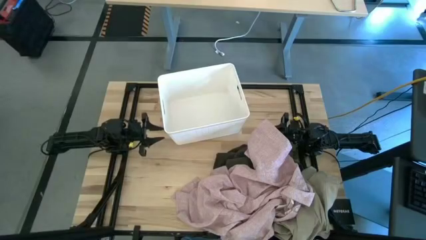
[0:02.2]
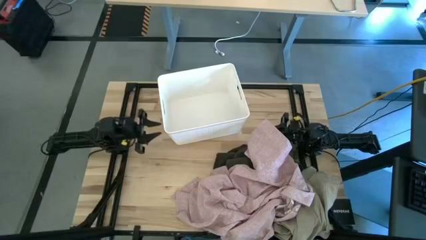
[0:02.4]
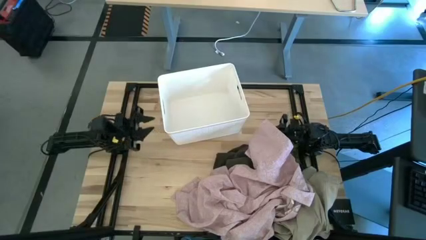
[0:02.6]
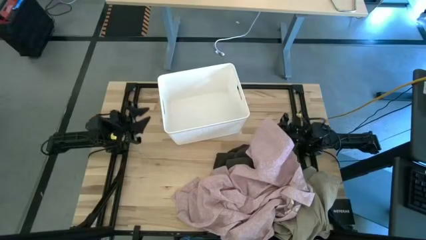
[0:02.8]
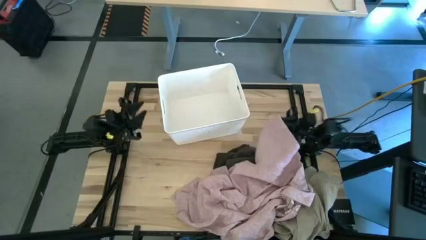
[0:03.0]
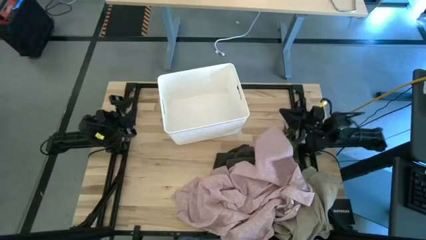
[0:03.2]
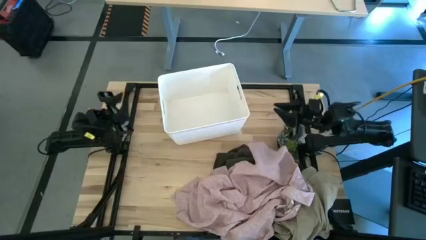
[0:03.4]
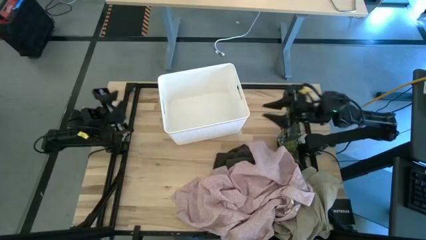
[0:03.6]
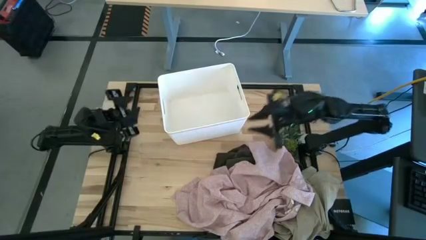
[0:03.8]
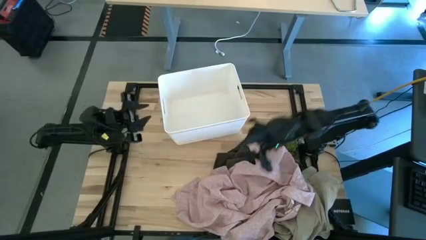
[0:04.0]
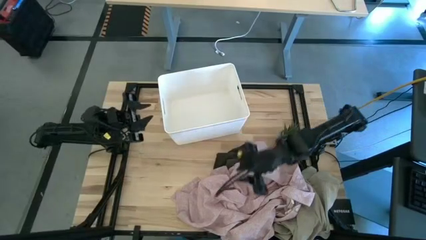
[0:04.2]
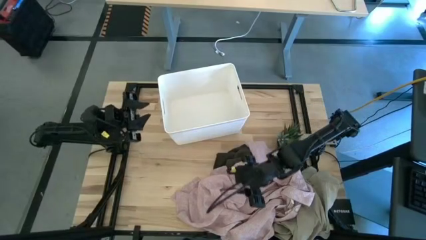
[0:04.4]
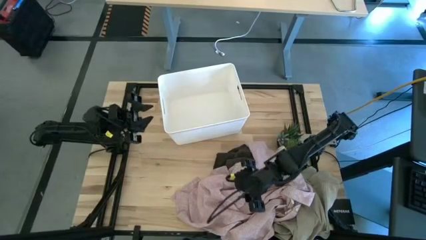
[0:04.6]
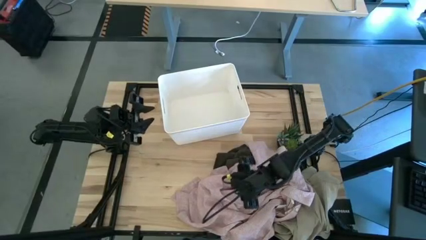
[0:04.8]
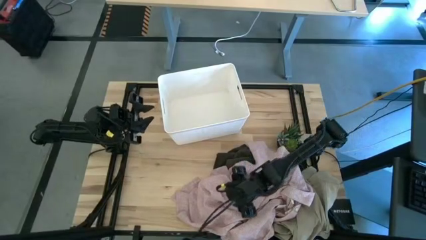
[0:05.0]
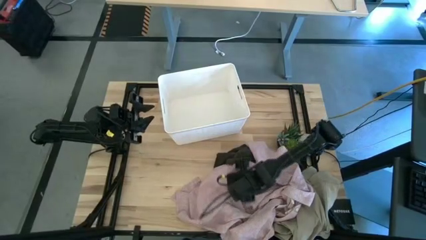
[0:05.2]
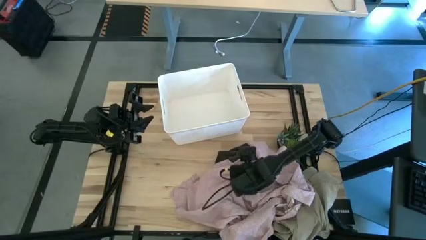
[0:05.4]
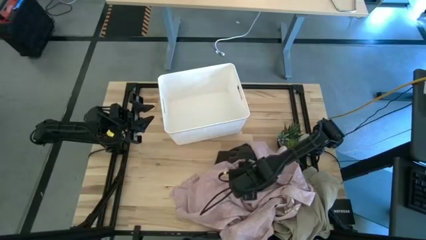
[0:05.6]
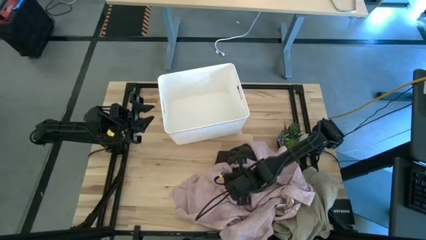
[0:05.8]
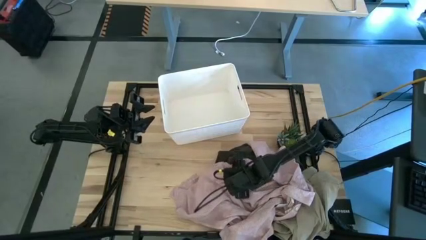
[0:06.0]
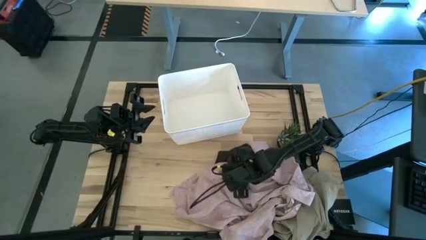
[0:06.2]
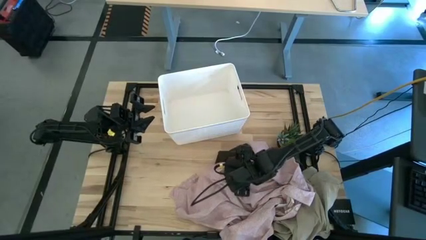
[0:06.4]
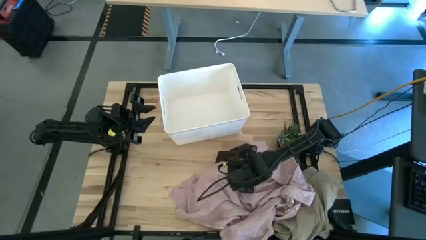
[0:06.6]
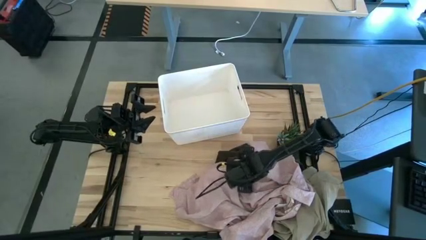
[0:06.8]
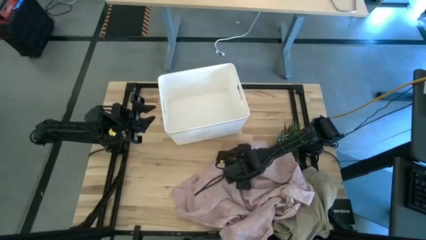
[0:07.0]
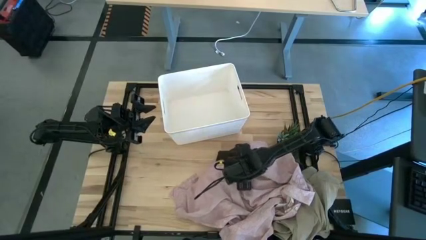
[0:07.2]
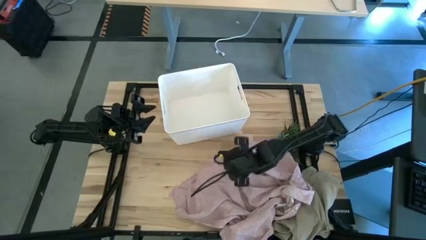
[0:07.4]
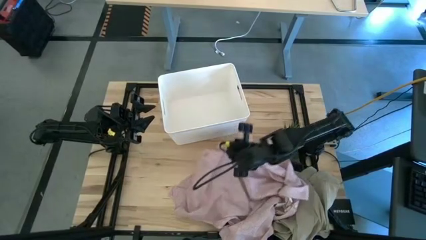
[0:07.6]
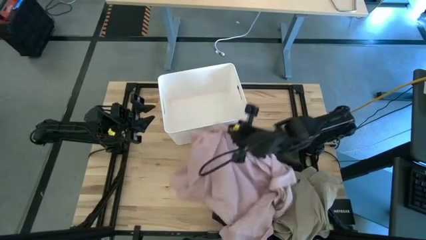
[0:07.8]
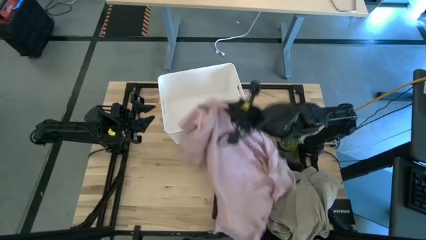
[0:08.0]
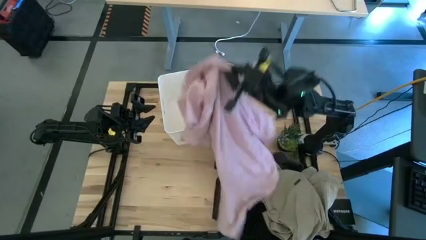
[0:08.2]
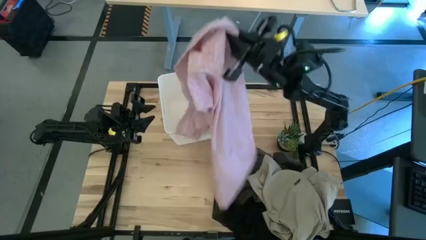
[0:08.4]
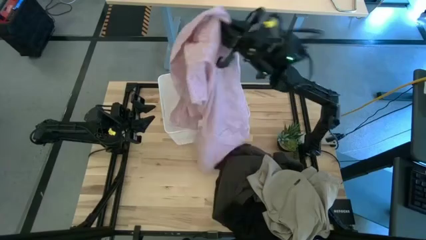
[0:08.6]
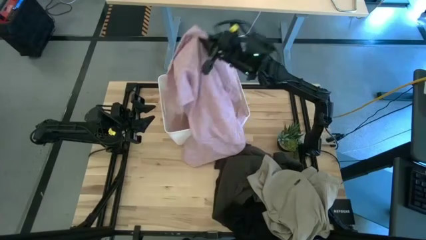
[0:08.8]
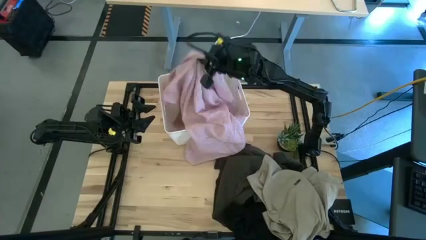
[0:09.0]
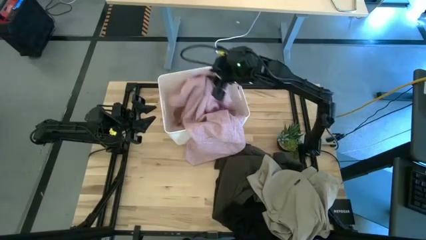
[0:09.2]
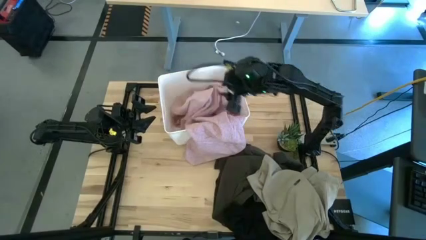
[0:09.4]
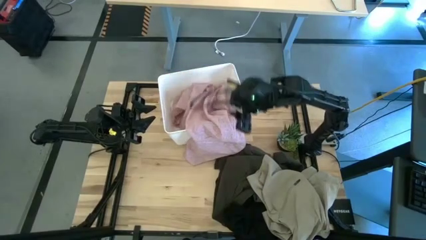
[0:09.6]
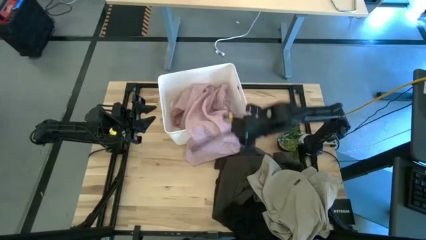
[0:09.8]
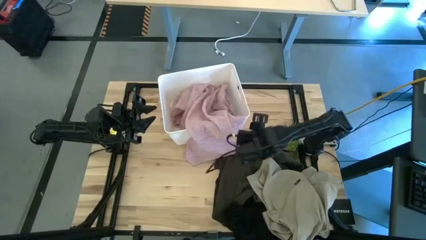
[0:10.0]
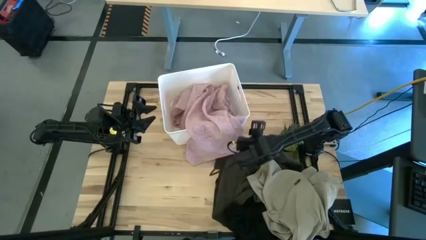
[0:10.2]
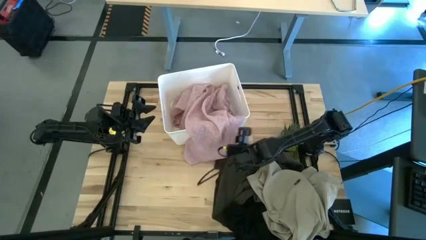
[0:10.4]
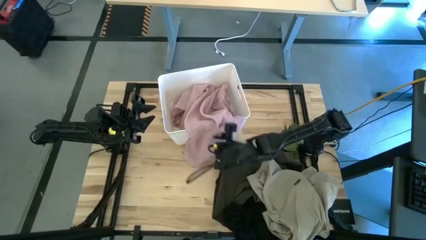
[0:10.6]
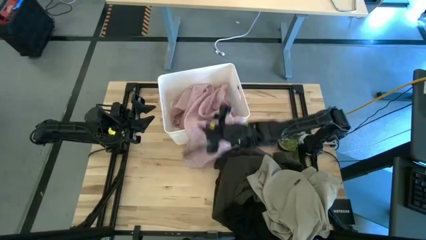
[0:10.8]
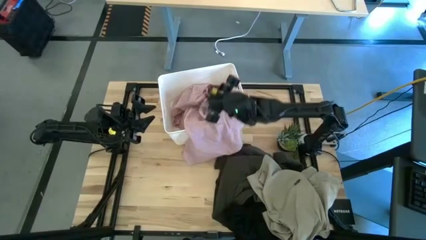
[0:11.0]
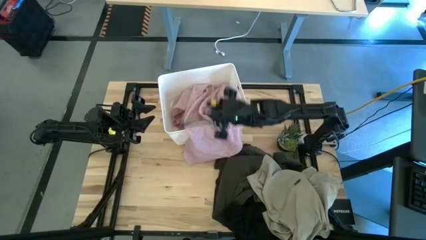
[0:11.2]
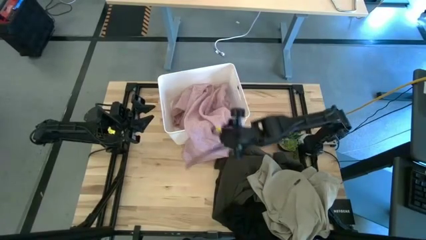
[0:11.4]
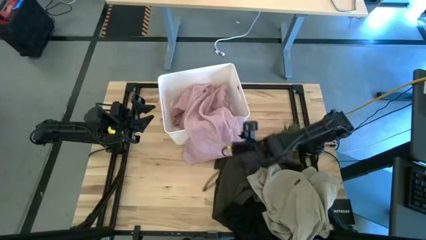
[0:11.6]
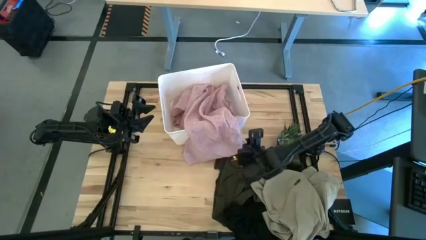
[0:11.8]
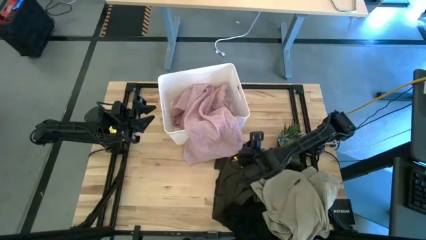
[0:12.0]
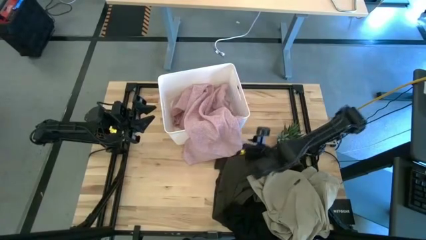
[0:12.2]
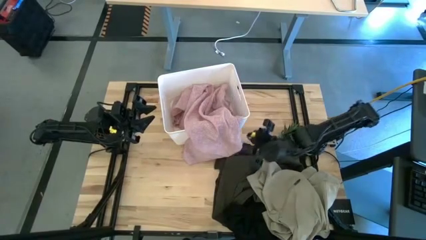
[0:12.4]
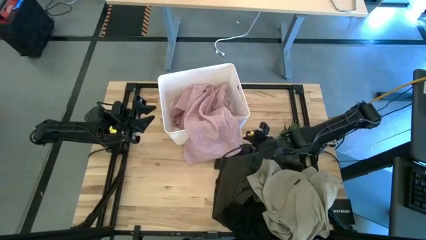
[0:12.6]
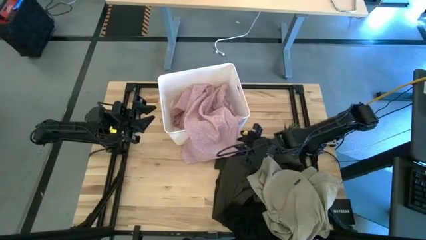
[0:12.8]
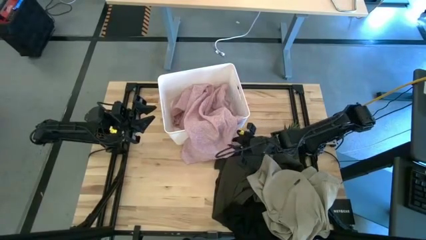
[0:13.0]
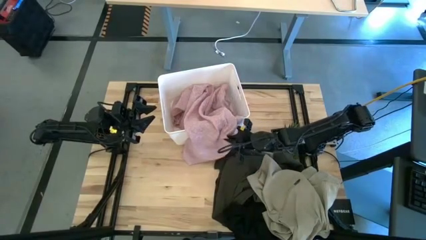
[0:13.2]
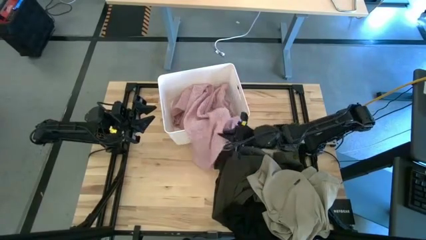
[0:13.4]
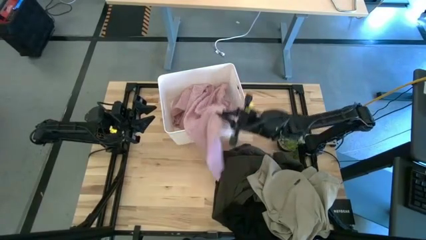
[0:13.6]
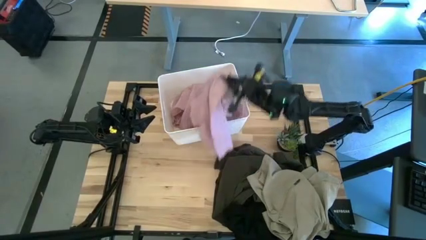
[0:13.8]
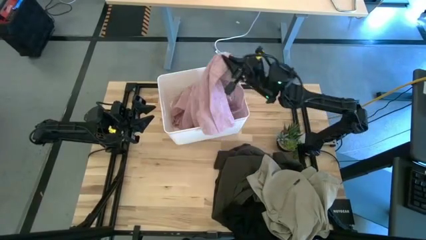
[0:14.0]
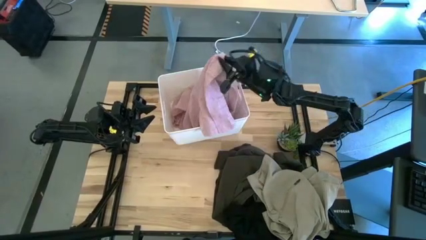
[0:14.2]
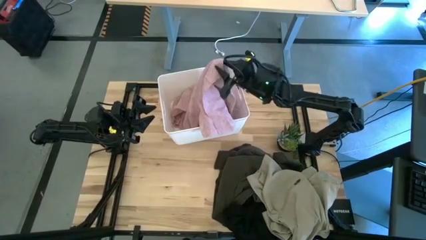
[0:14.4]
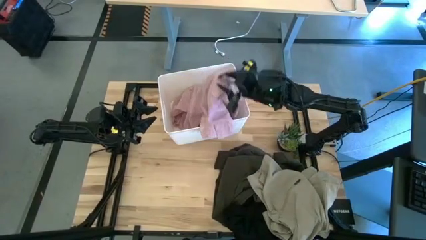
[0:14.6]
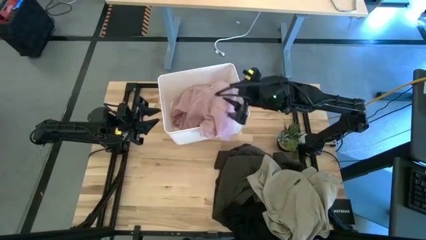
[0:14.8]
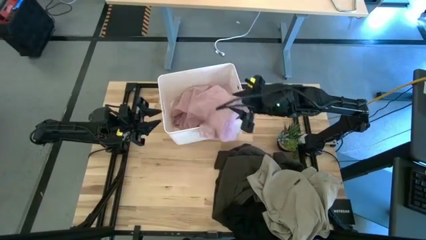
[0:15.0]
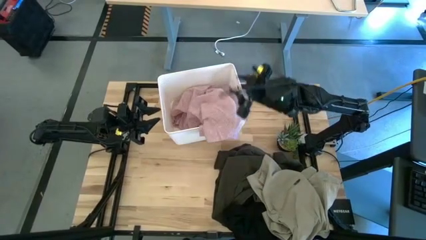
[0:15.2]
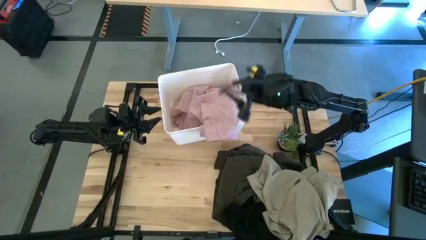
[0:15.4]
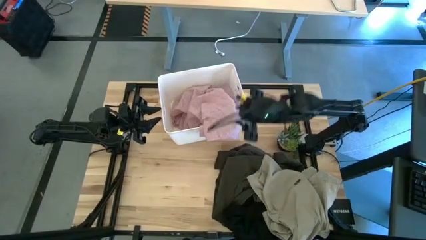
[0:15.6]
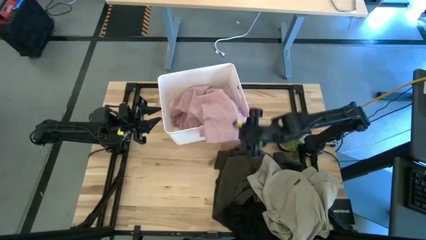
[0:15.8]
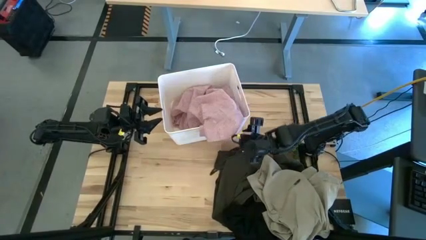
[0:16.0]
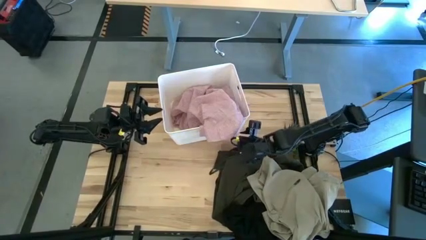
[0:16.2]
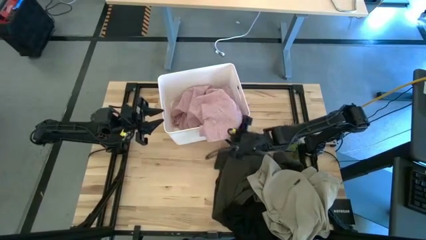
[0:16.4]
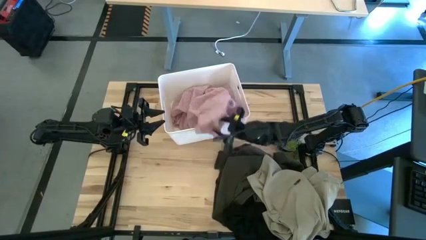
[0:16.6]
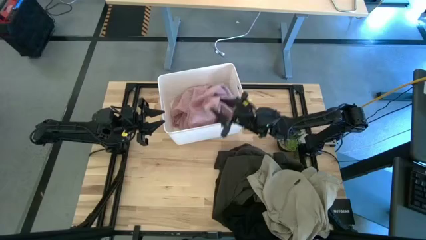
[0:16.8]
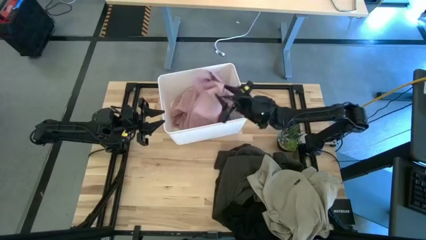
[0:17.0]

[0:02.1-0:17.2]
Task: Sort clothes
Put the pink polo shirt into the white laundry bin
